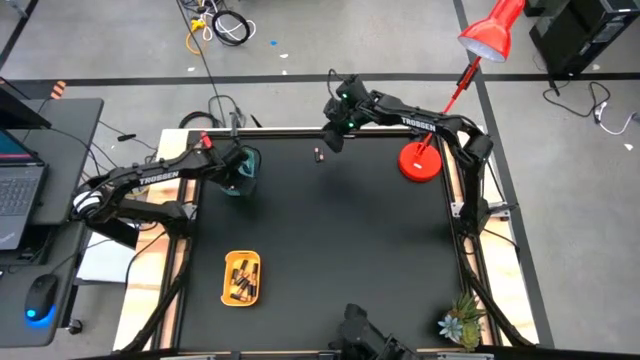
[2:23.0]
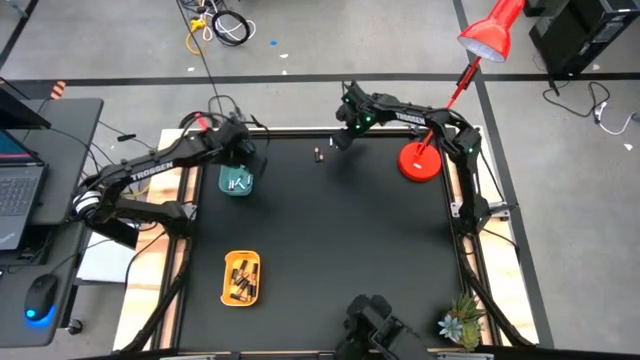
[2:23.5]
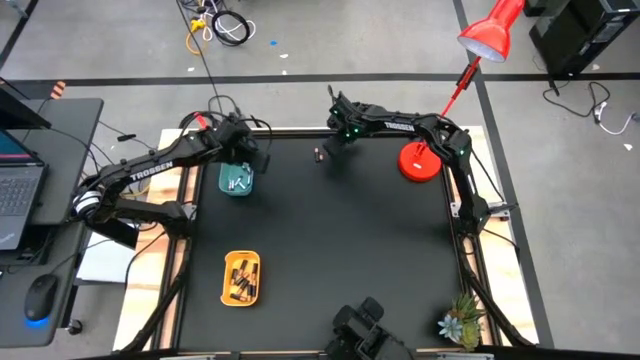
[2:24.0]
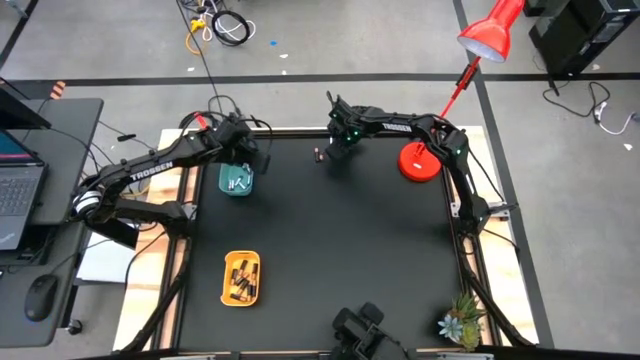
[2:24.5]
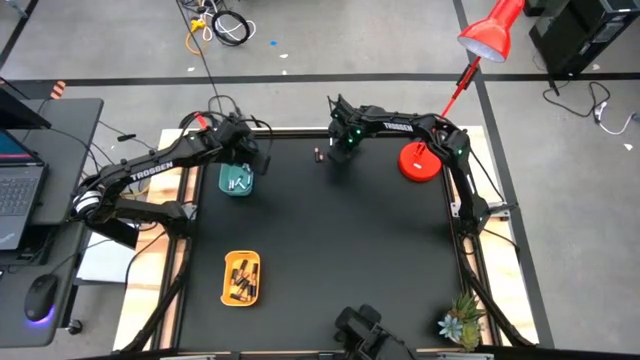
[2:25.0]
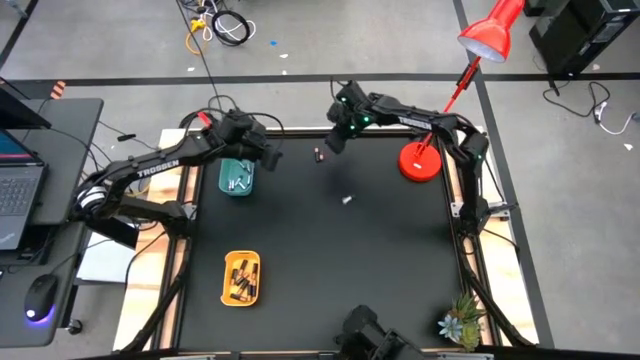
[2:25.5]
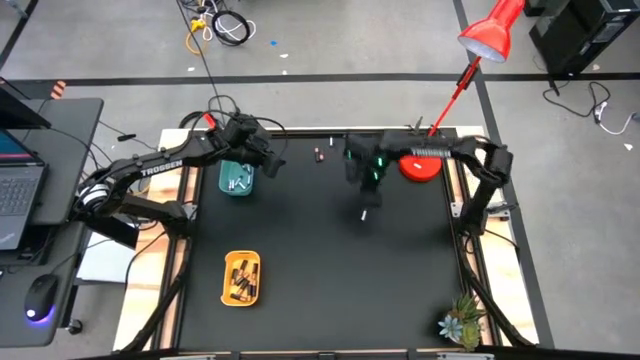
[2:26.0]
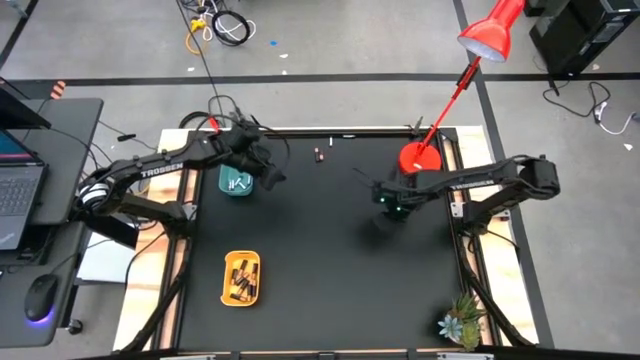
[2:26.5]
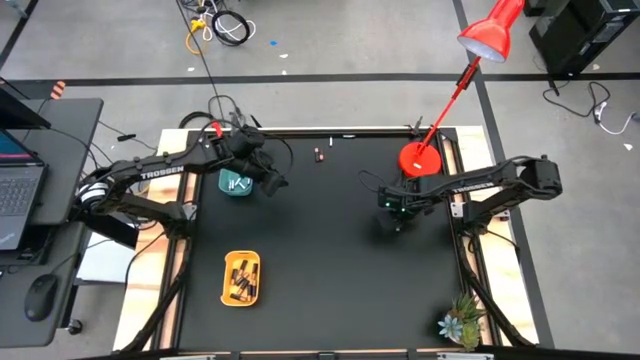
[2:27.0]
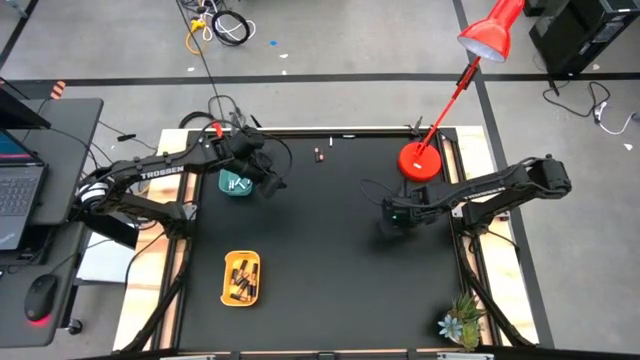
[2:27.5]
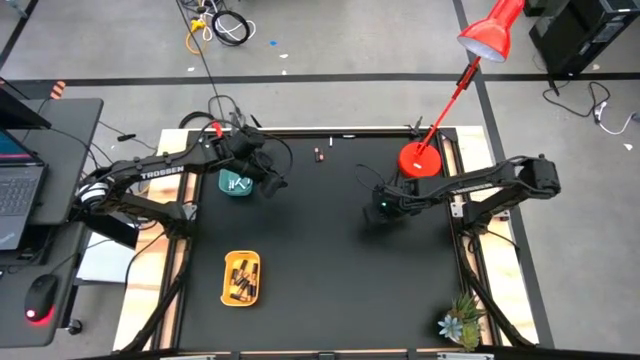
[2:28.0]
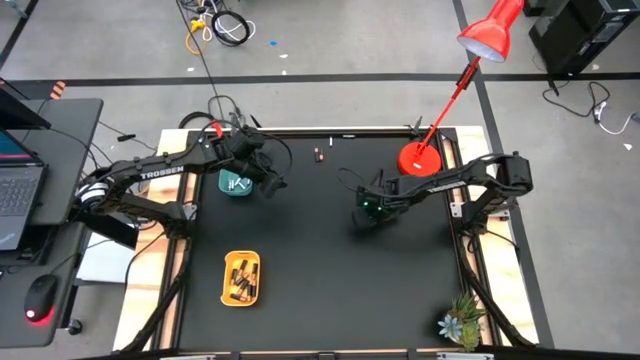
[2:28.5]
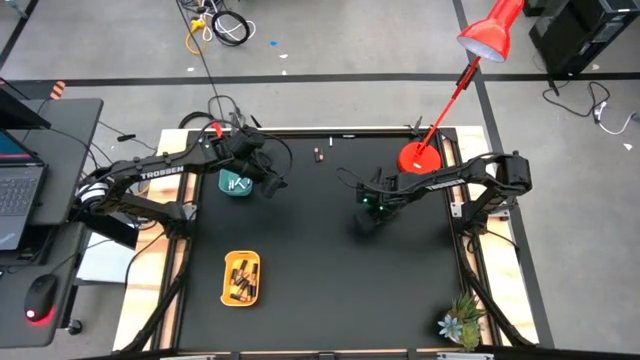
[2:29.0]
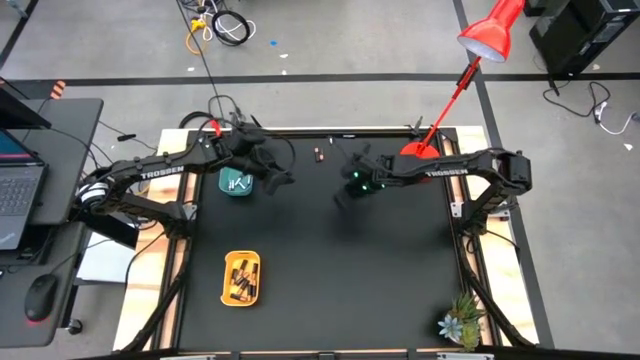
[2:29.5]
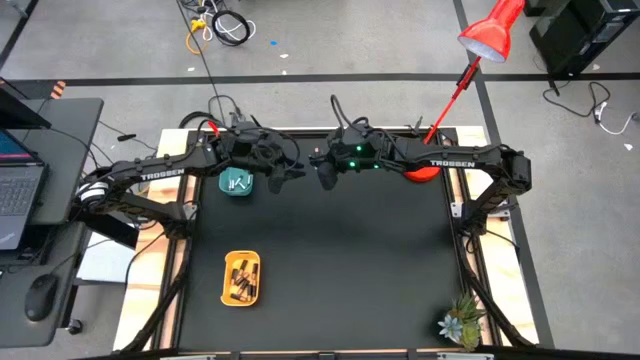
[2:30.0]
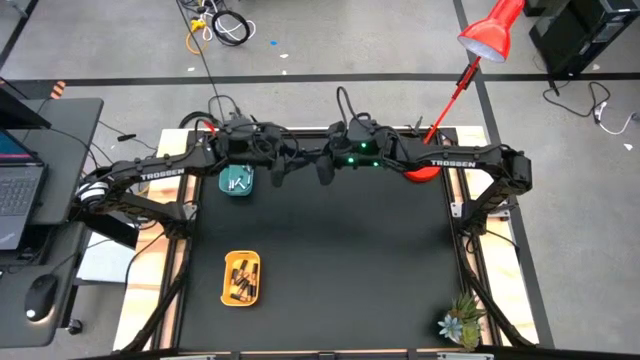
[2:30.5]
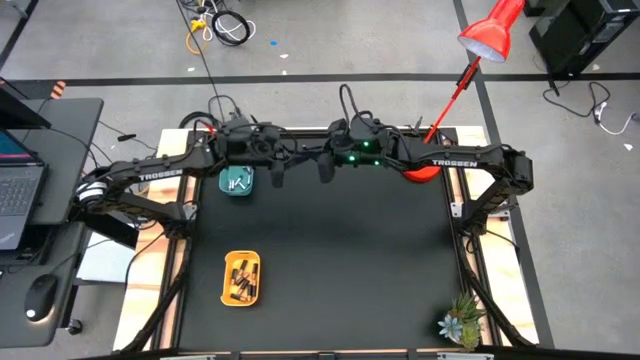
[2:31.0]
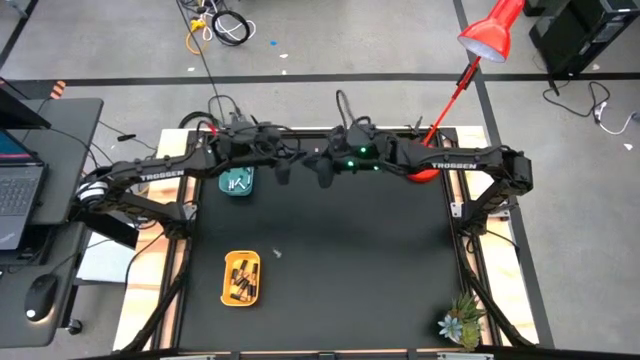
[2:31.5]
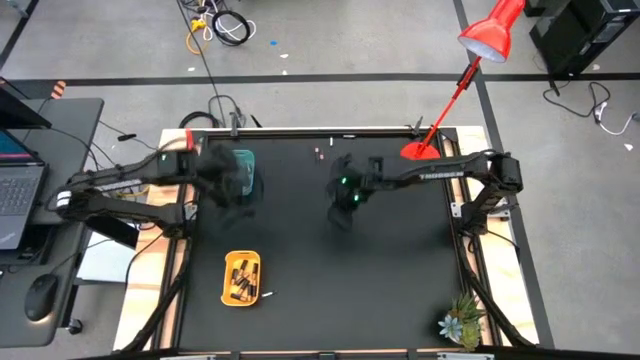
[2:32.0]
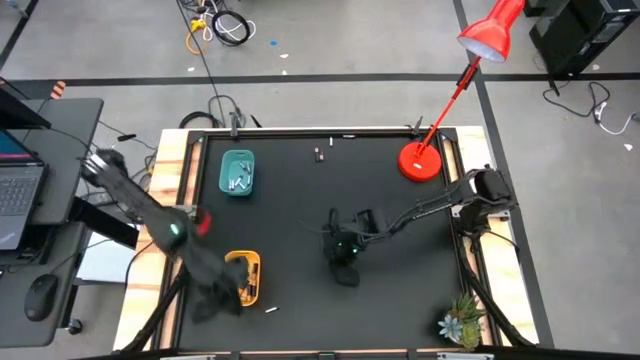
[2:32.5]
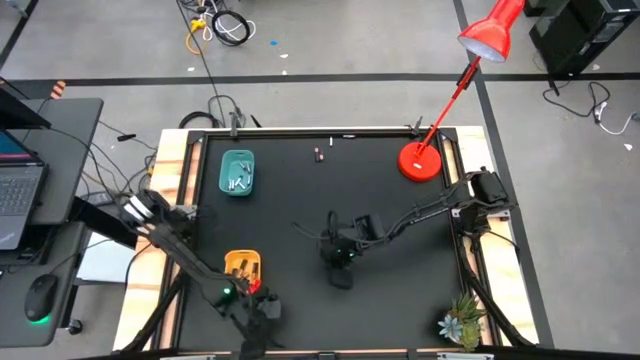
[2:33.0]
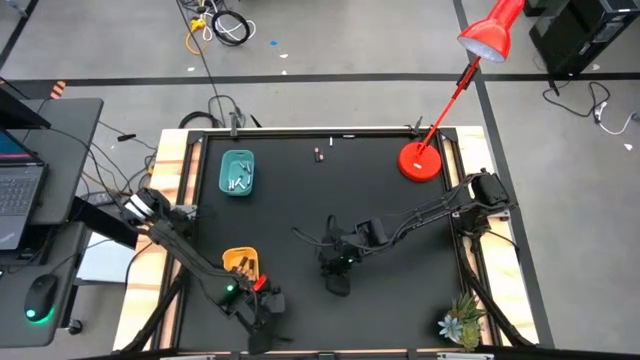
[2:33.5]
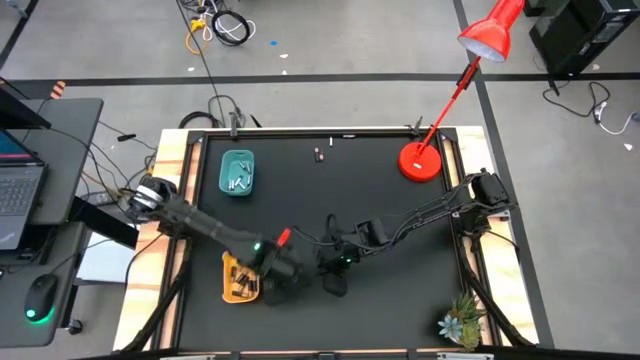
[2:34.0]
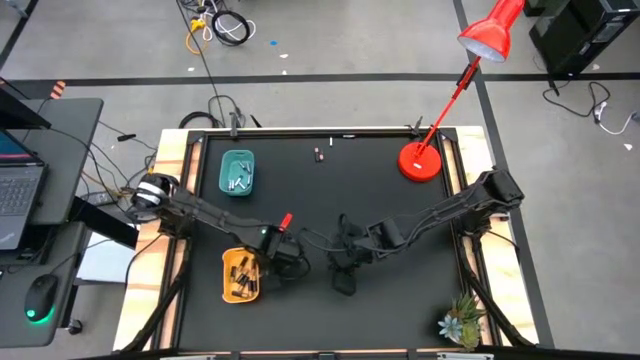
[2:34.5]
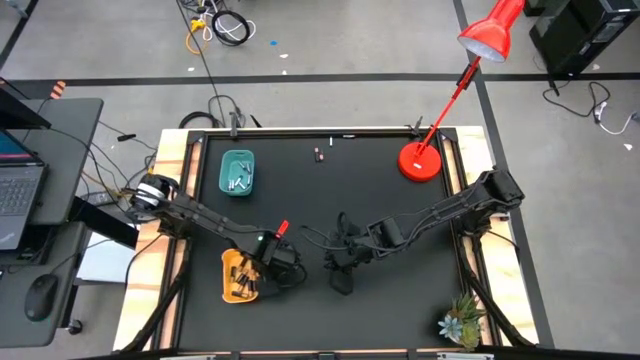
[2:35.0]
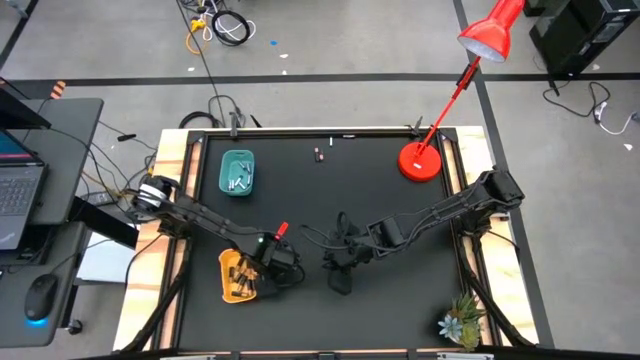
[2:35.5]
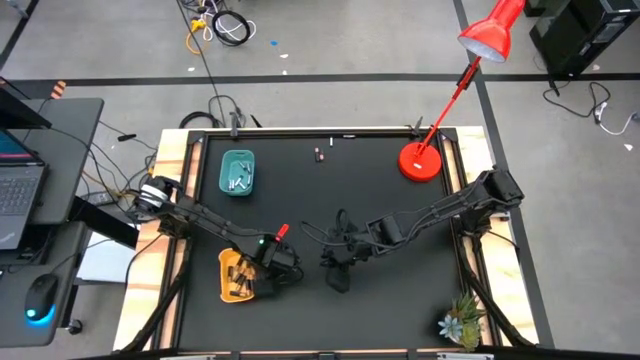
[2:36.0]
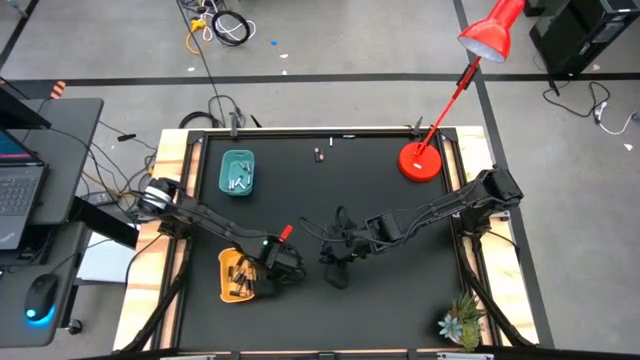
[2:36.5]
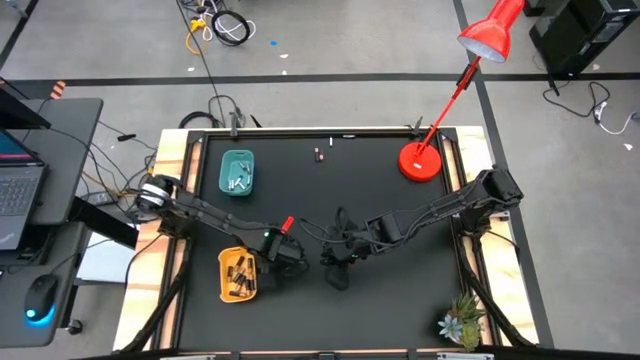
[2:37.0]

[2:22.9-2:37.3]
Task: Sort batteries
Put the white battery into the blue bin

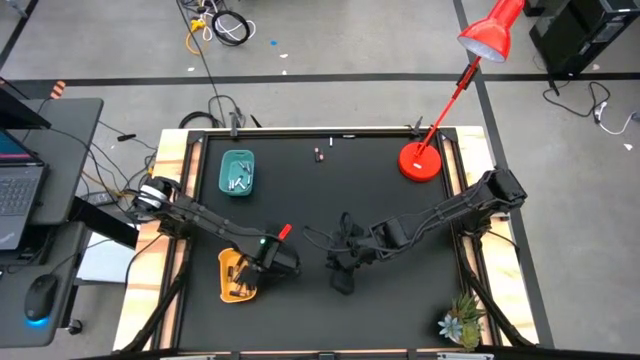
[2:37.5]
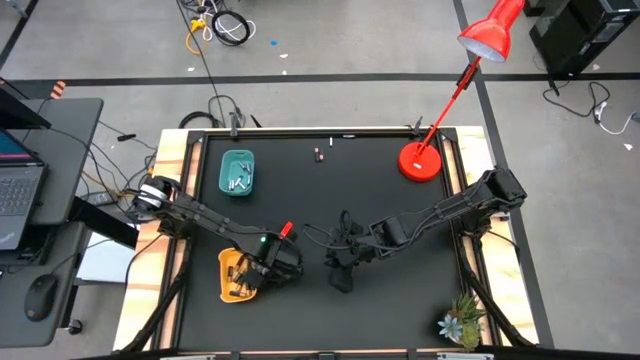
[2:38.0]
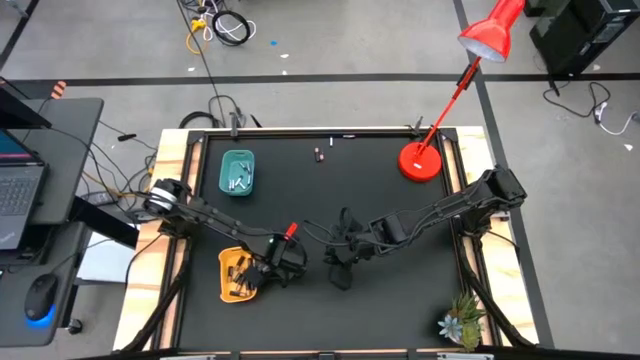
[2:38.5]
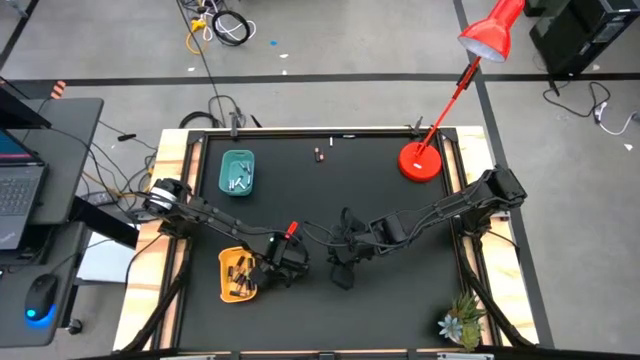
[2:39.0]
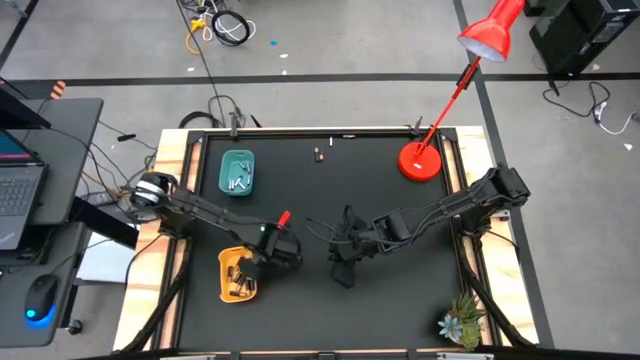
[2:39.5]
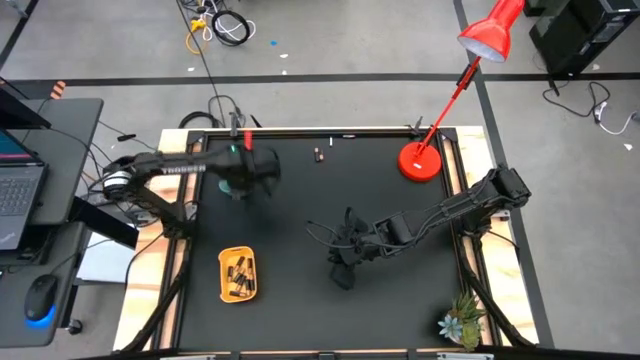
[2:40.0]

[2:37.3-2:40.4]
Put the white battery into the blue bin

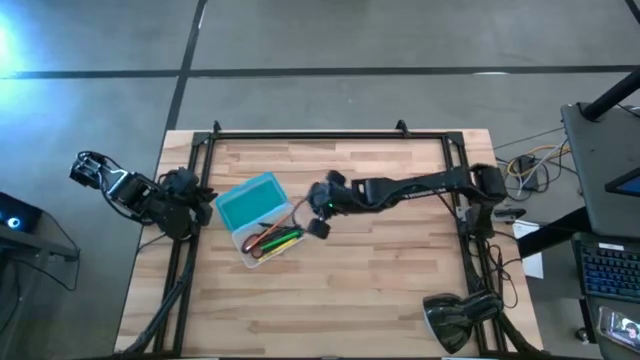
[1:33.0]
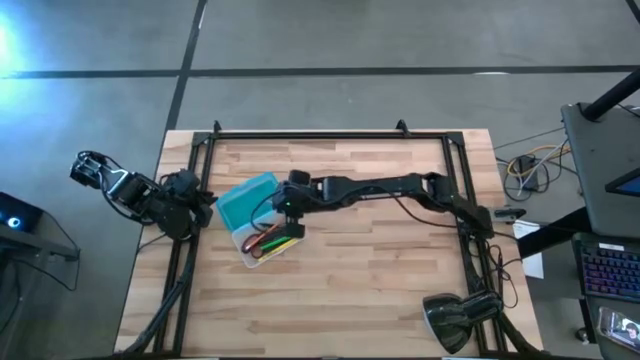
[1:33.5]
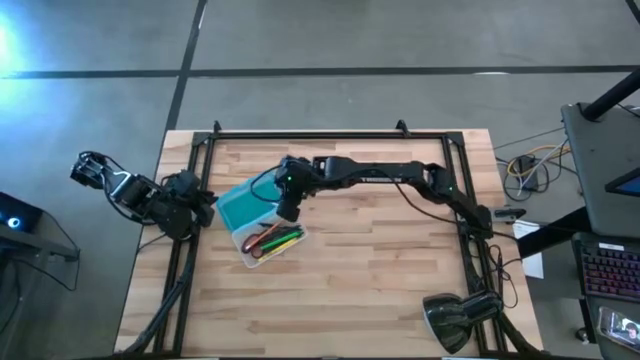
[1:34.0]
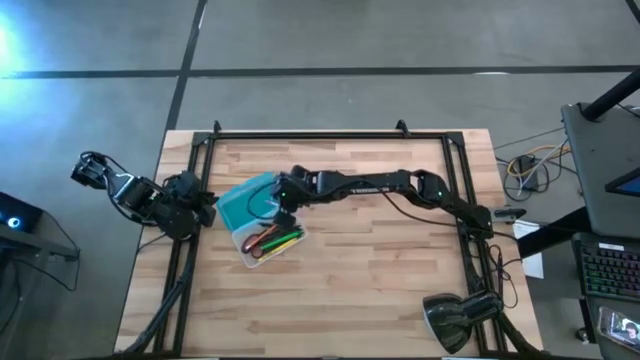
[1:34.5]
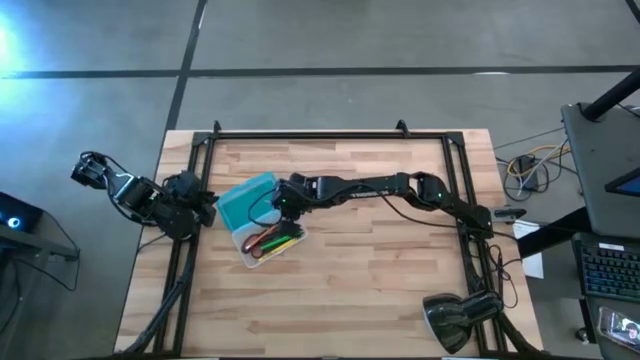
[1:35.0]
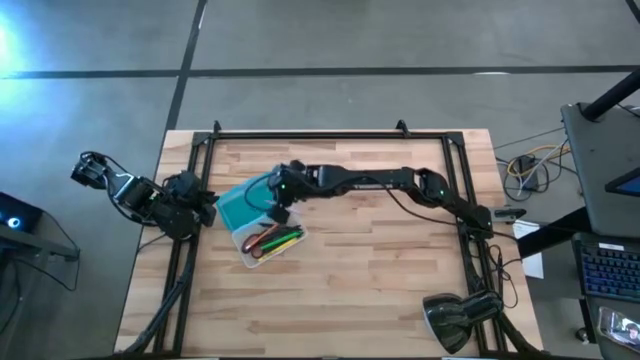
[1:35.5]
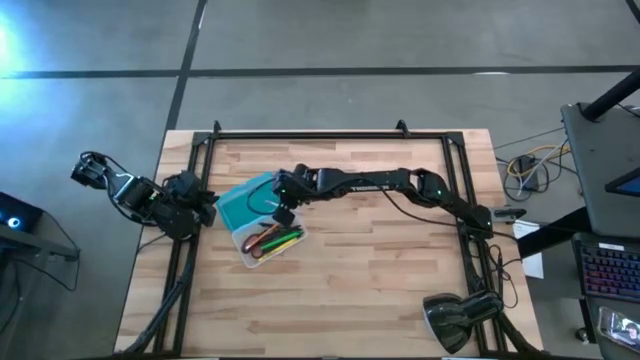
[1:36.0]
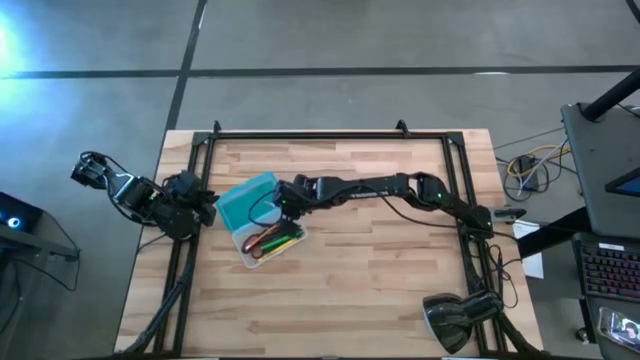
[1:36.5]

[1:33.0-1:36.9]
Task: Pick & place school supplies into a supply box
Put the purple pen into the blue supply box
